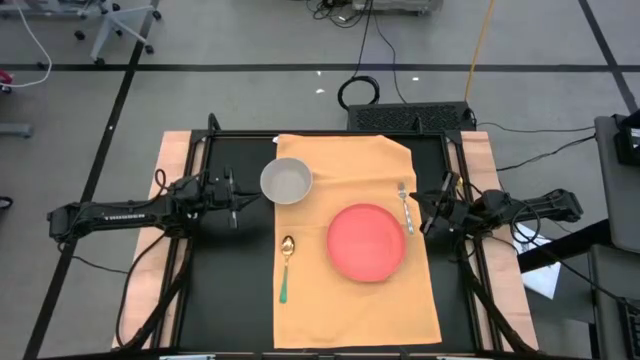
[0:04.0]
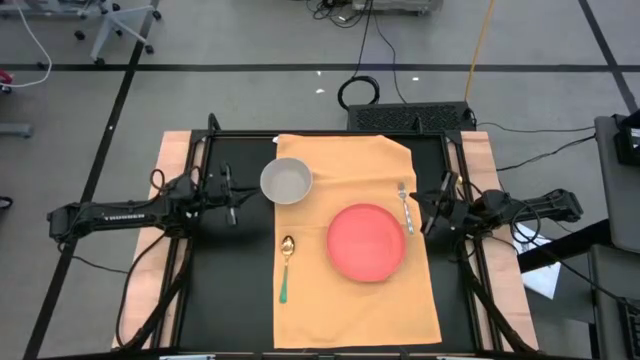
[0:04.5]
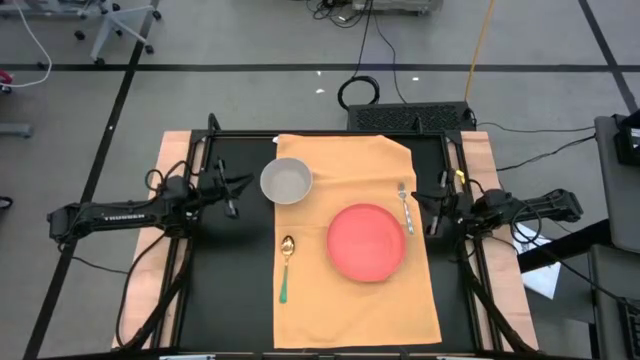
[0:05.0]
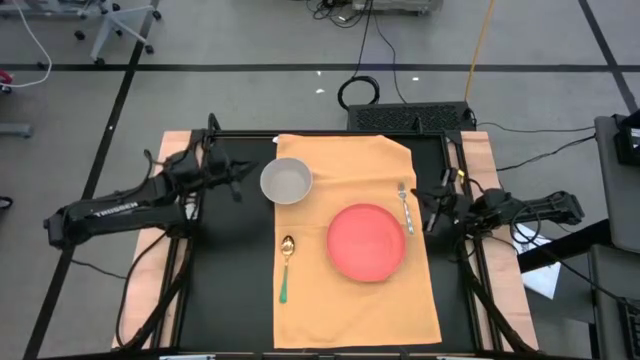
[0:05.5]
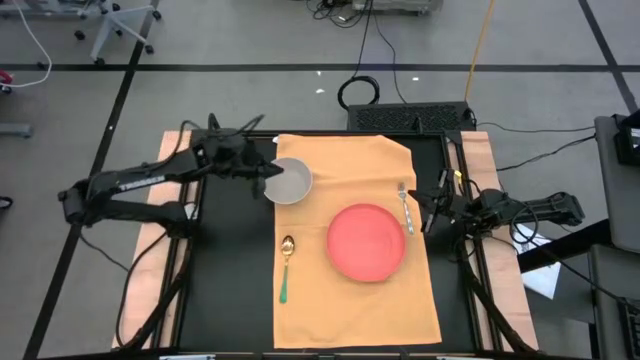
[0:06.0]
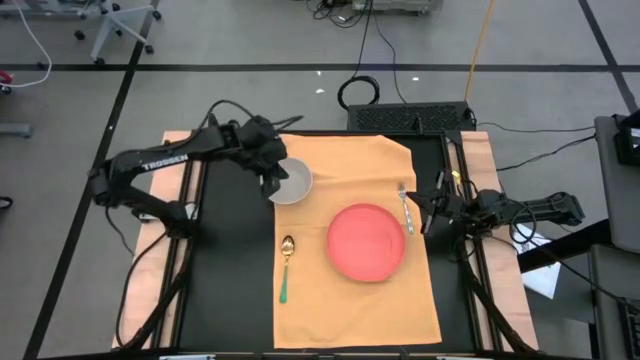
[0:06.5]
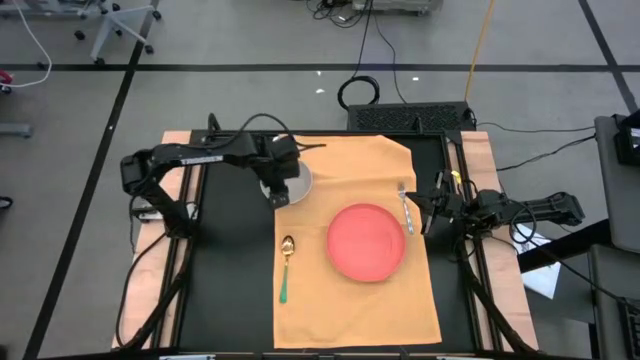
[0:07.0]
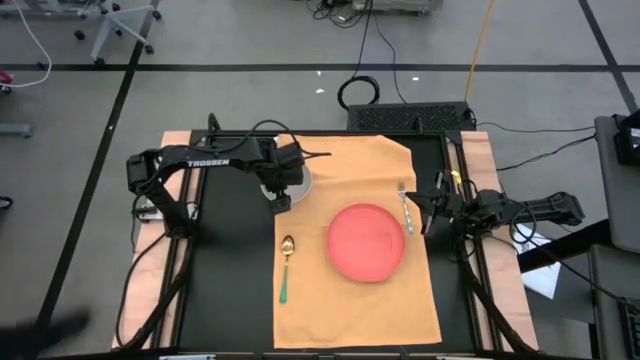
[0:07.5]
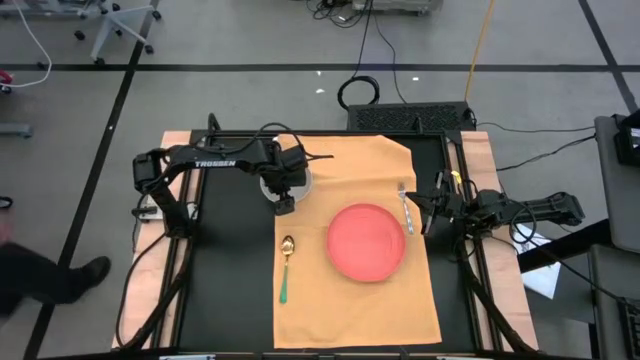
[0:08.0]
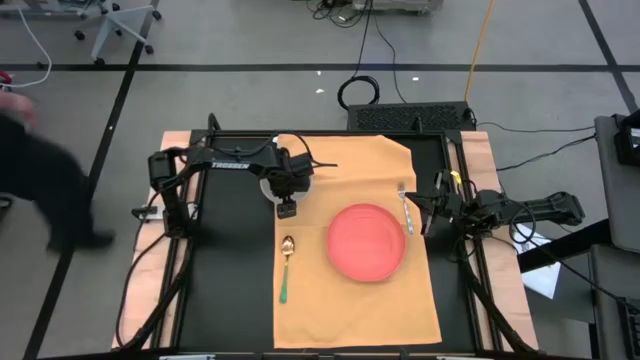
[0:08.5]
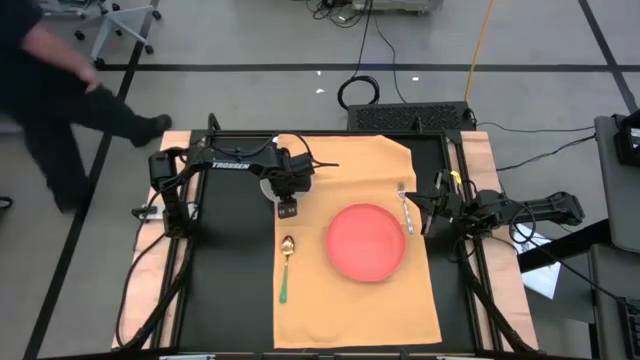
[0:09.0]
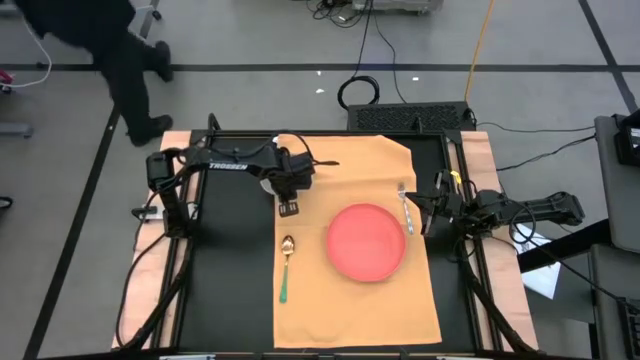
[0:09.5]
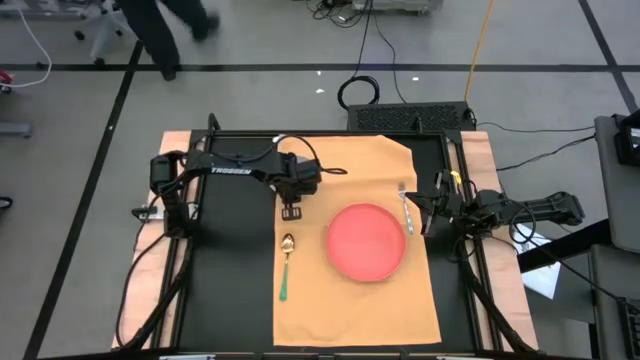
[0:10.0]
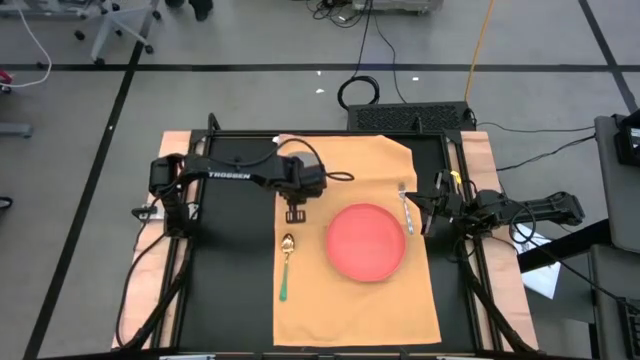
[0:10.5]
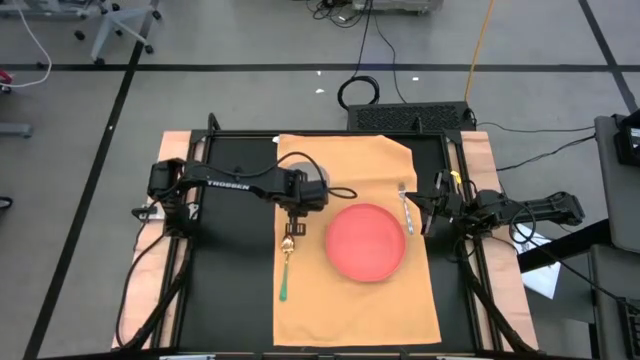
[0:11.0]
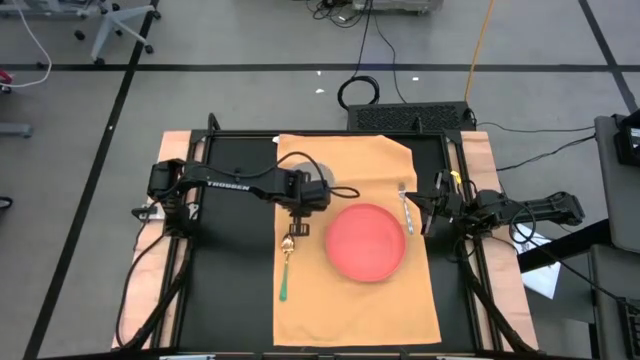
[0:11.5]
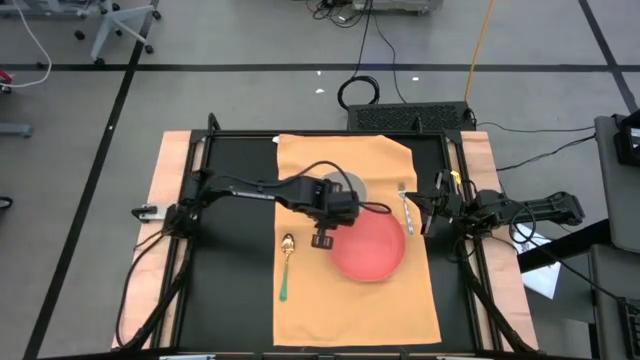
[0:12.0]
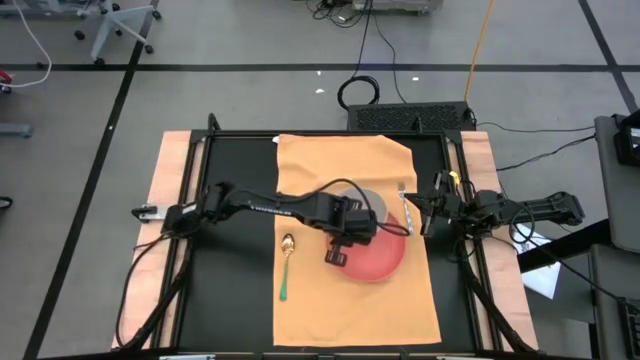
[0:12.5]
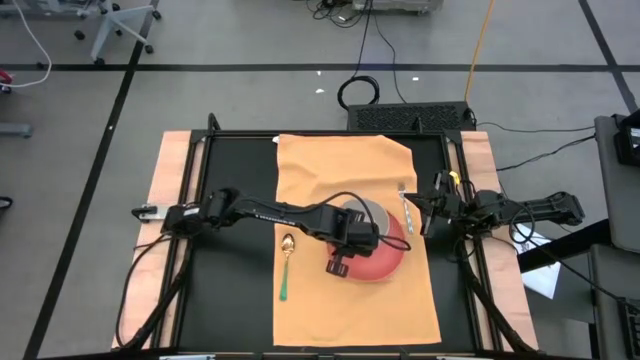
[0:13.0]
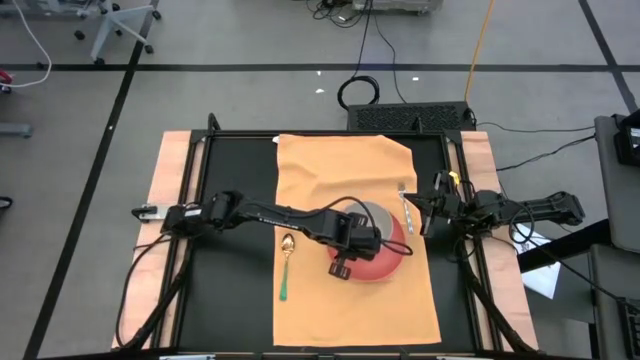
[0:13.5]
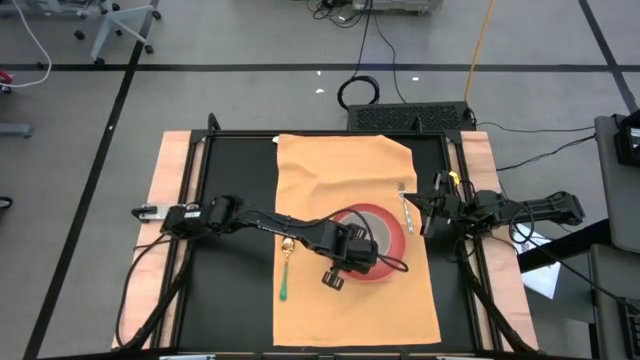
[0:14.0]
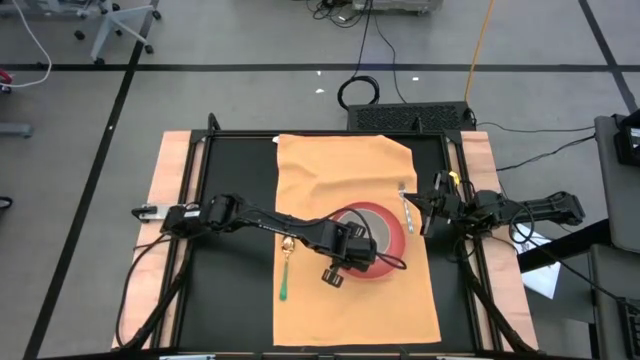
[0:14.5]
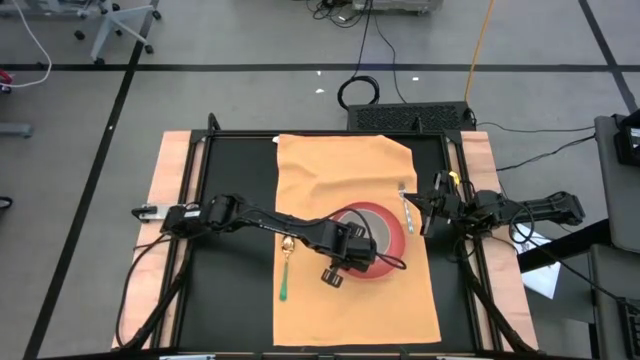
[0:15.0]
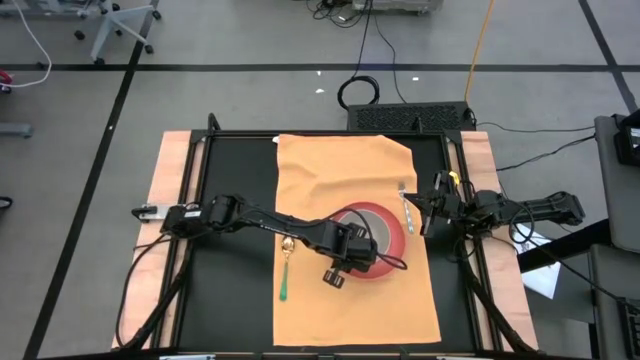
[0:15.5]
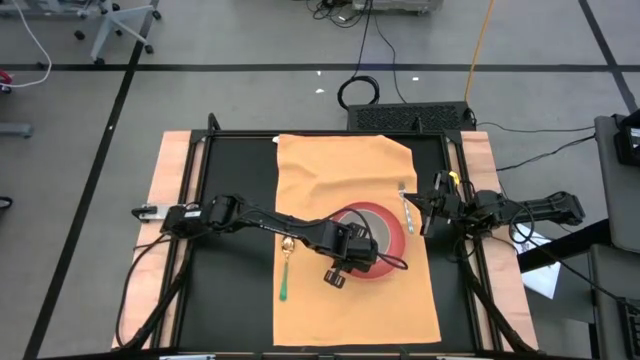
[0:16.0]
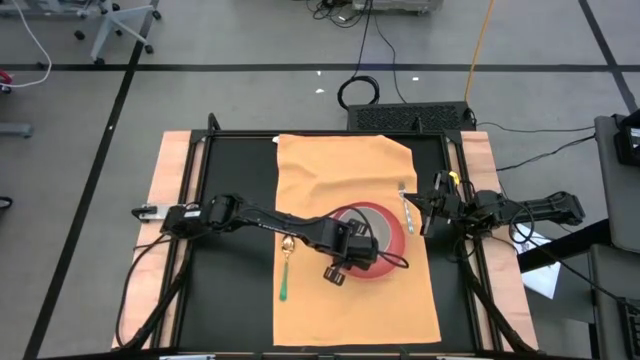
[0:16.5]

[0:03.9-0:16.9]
Task: Set table place
Put the bowl on the plate on the napkin
